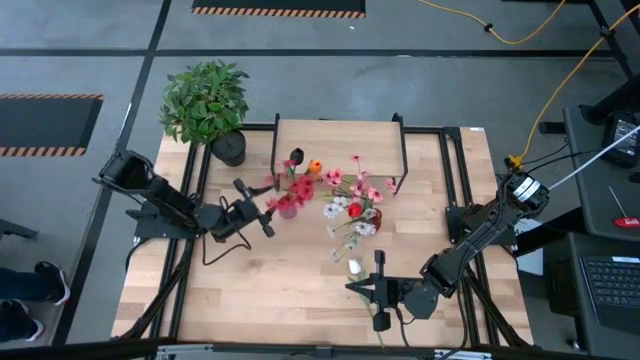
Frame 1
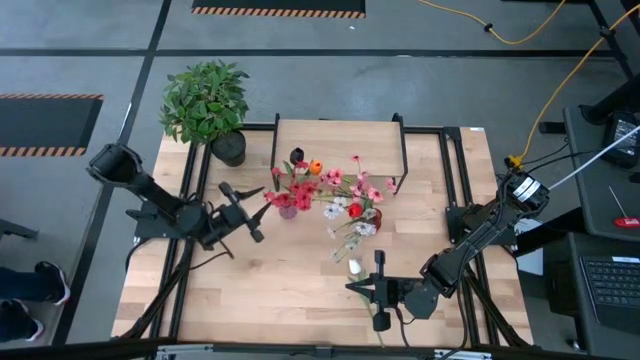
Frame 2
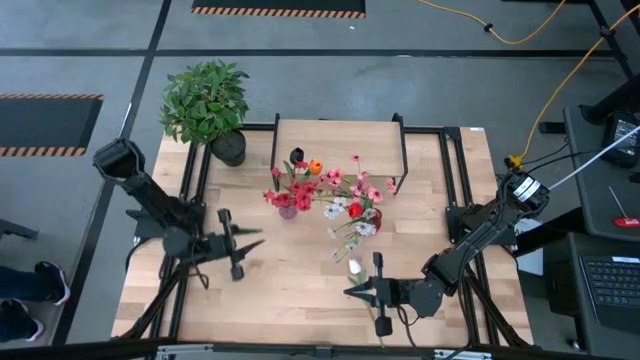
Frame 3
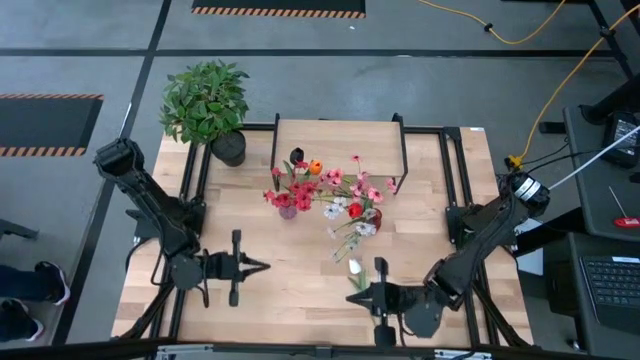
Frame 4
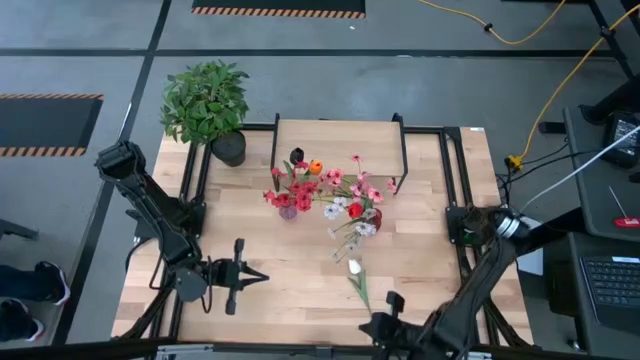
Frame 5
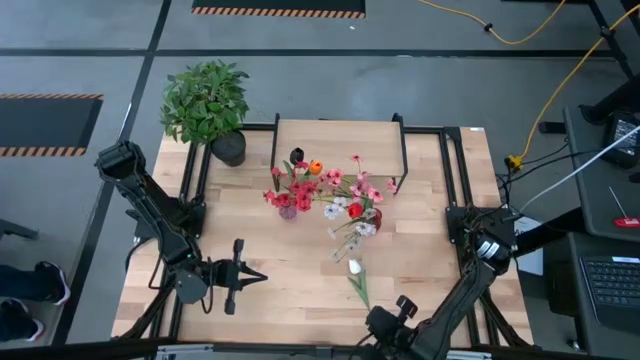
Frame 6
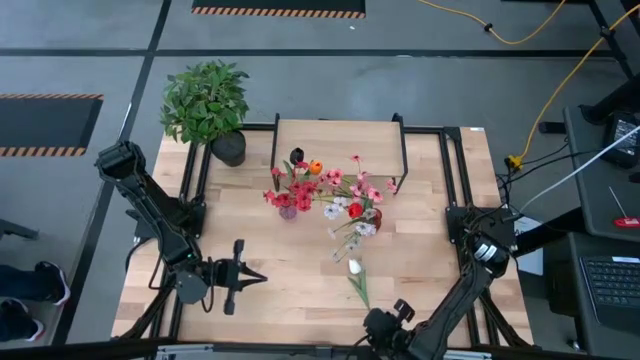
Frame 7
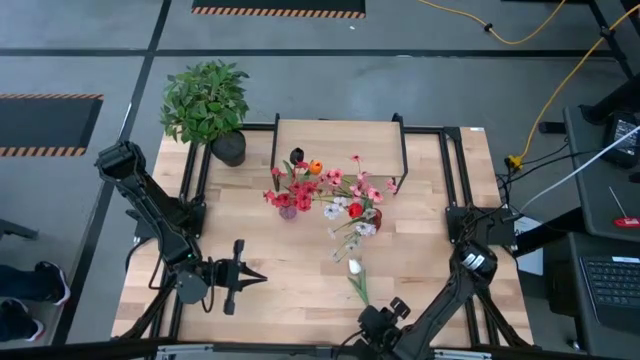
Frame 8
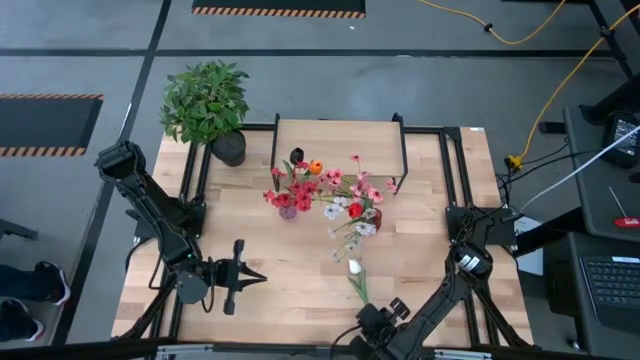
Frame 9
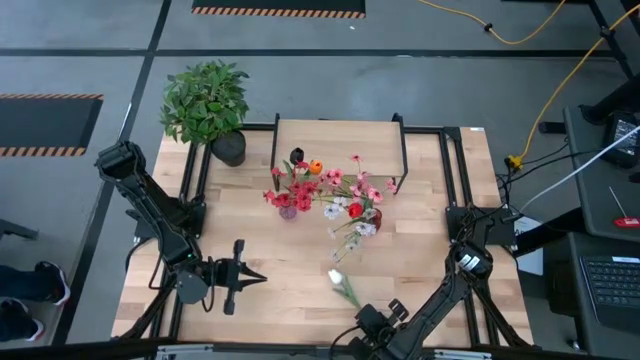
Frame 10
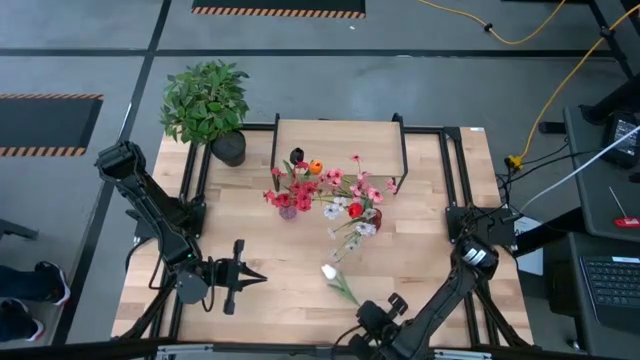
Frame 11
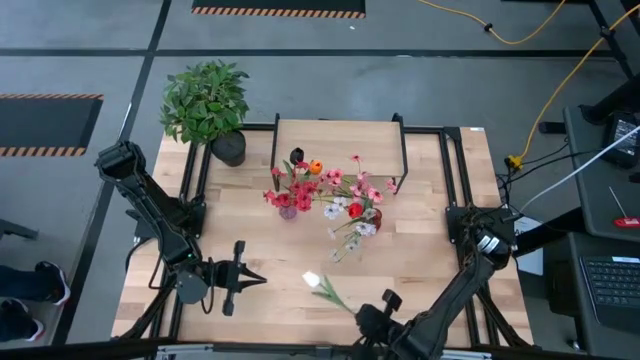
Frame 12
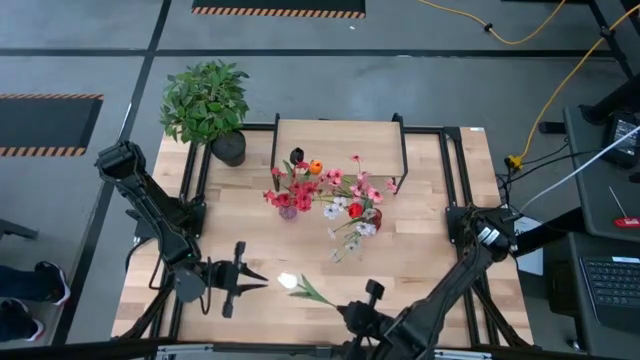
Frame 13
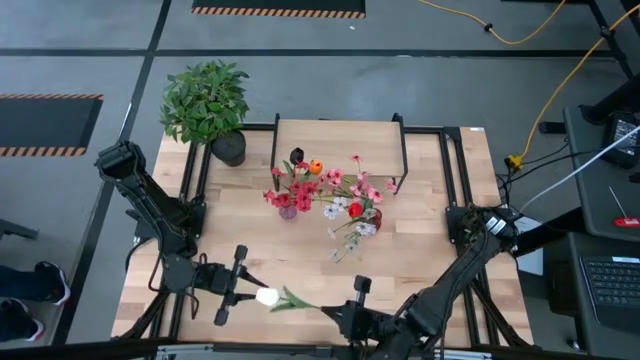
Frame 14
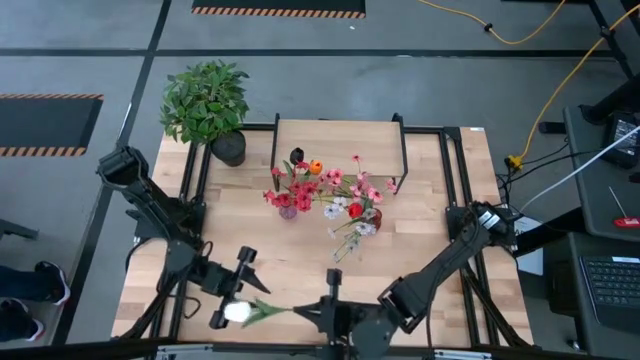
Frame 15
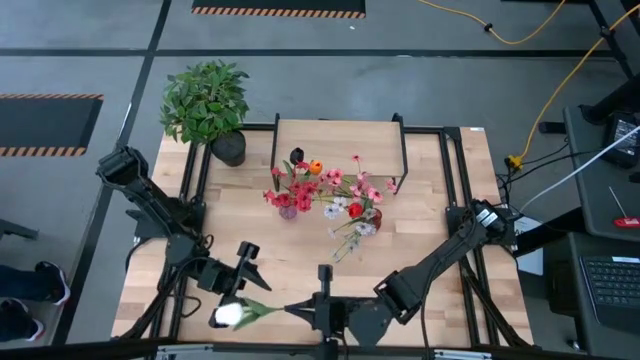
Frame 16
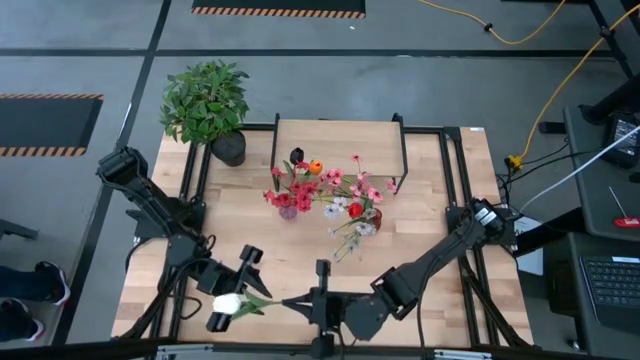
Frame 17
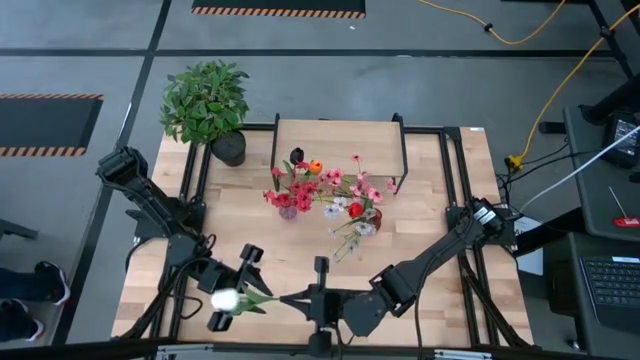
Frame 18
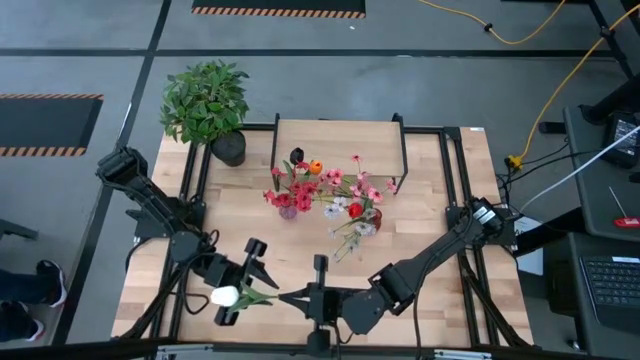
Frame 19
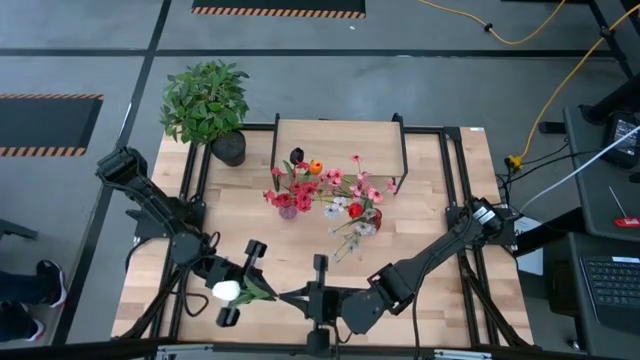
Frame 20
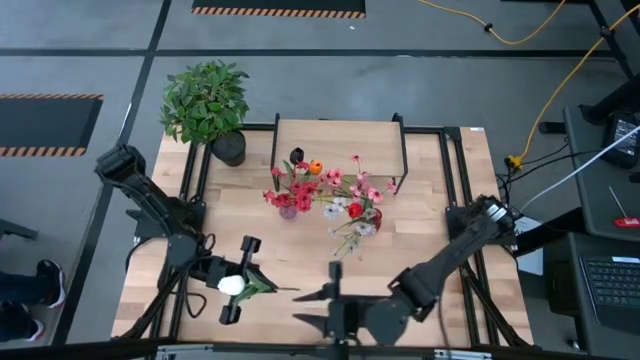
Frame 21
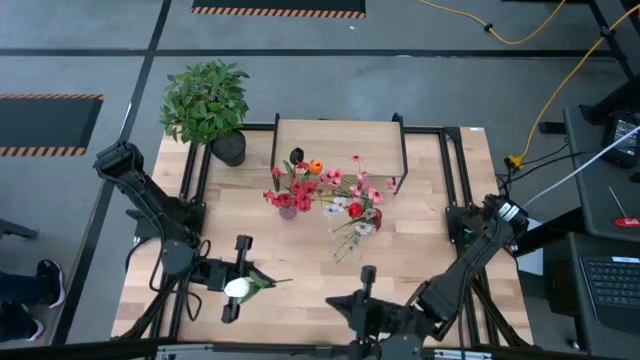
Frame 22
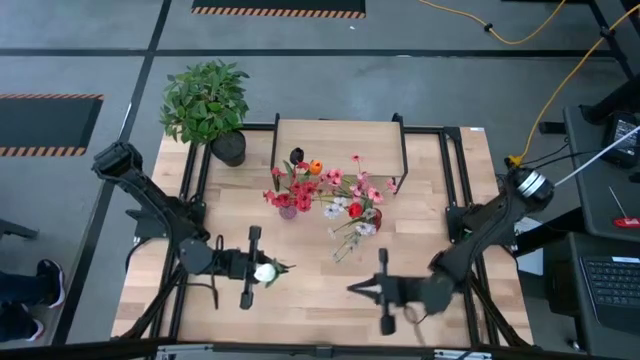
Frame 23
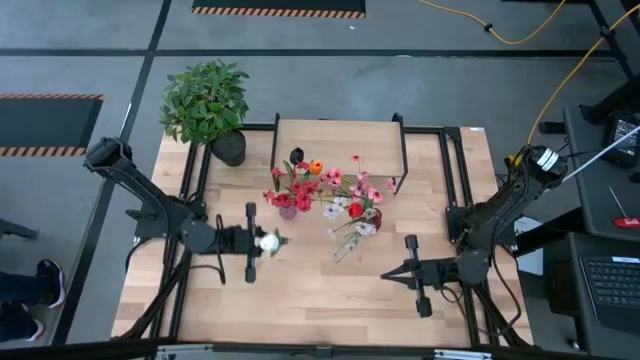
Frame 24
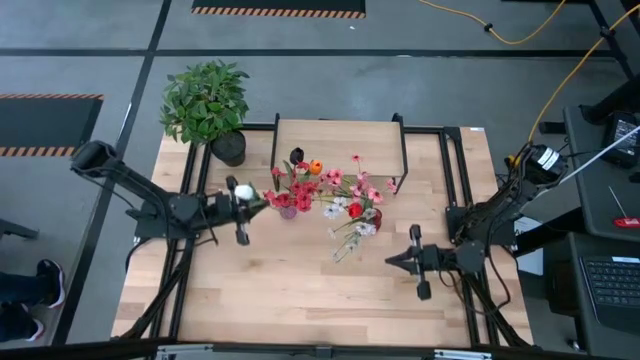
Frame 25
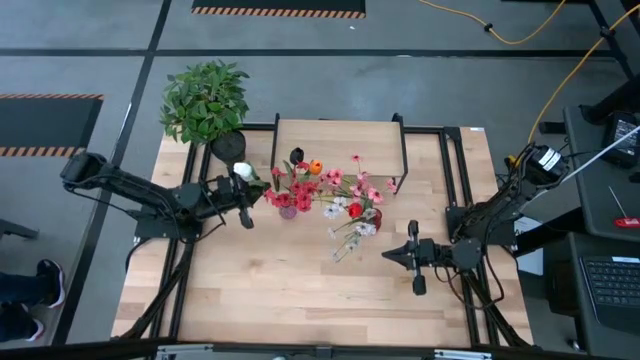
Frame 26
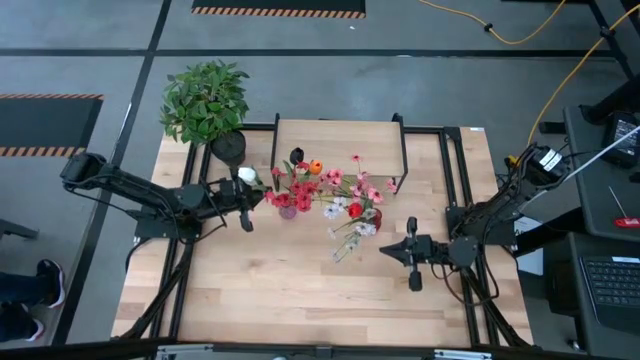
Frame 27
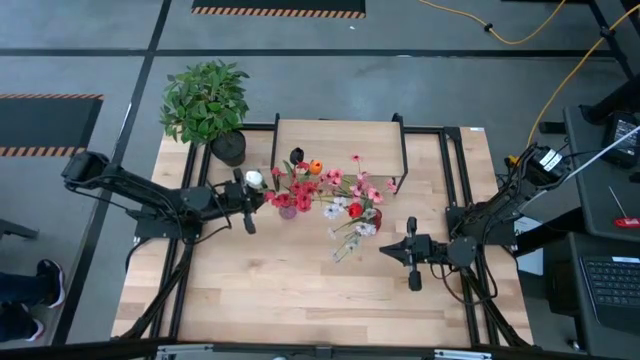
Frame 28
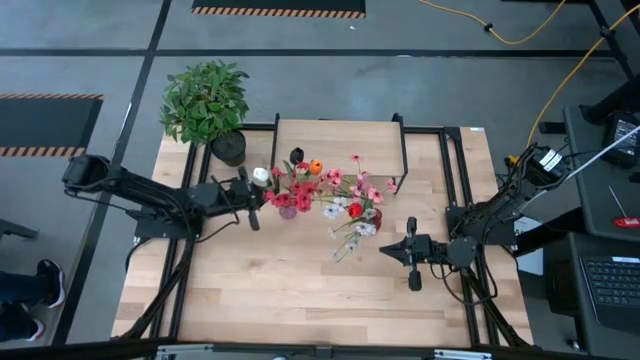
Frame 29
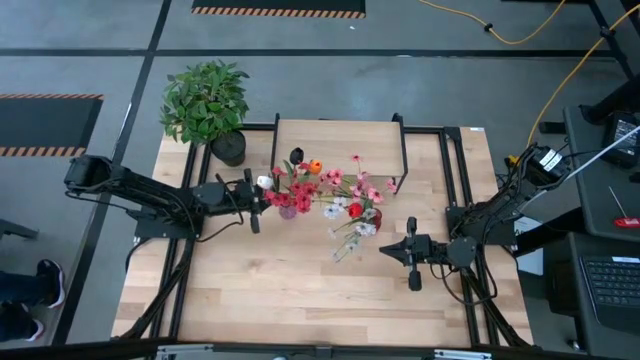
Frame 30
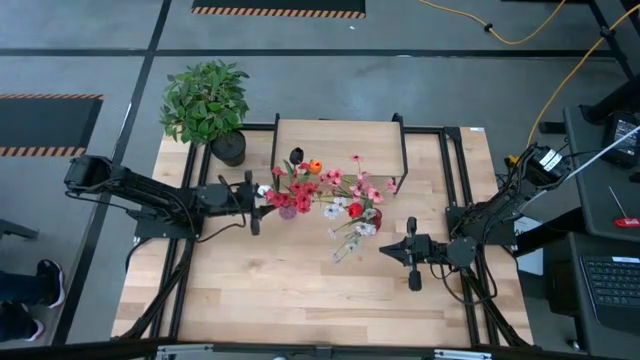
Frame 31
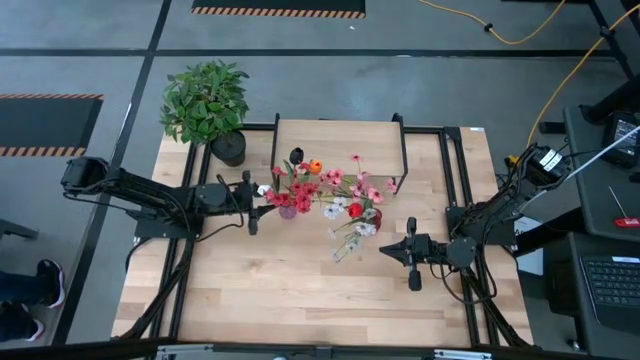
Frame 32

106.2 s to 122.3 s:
Task: Pick and place flowers into a vace then onto a shelf
Put the white tulip into the purple vase

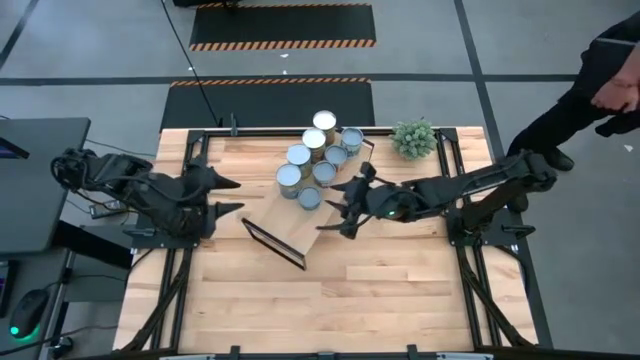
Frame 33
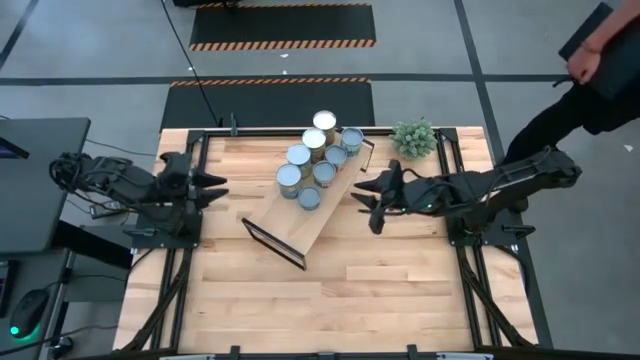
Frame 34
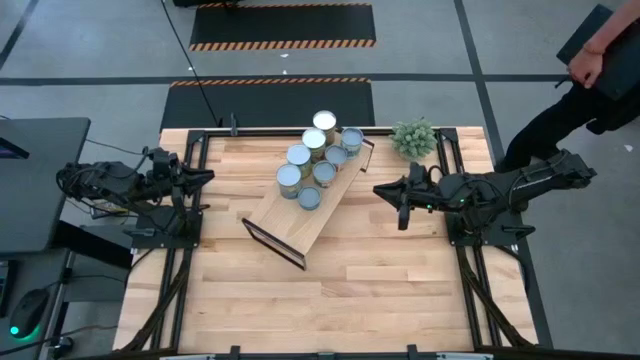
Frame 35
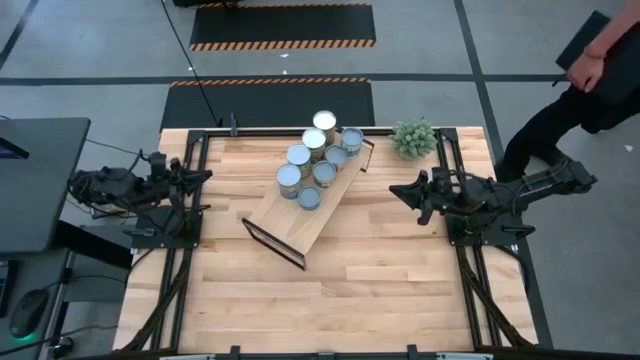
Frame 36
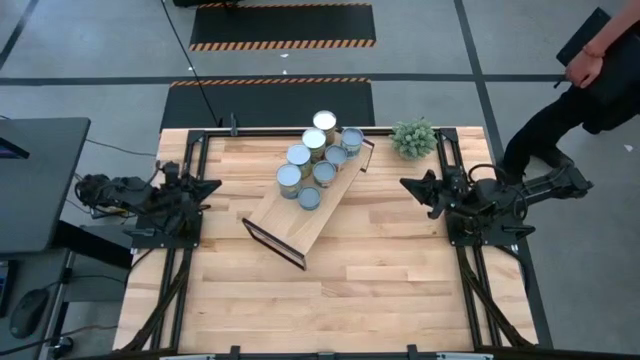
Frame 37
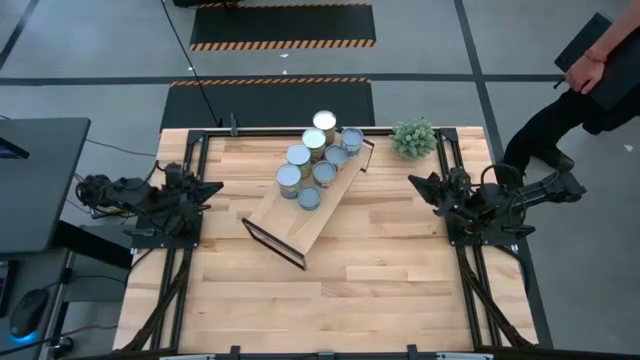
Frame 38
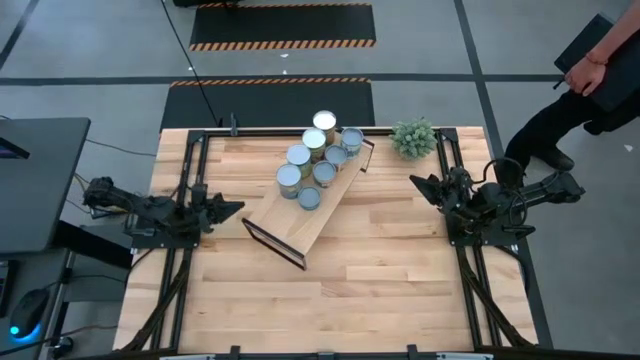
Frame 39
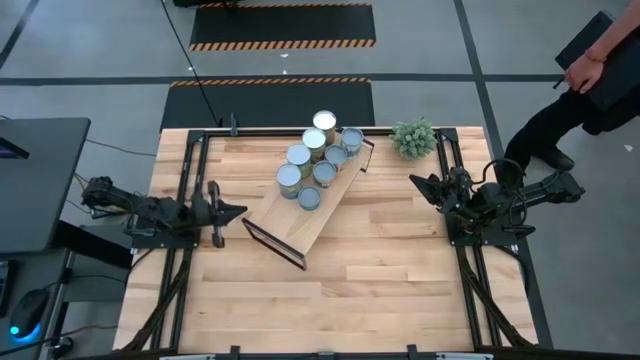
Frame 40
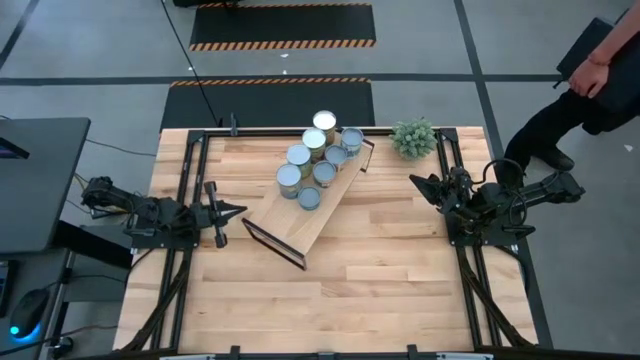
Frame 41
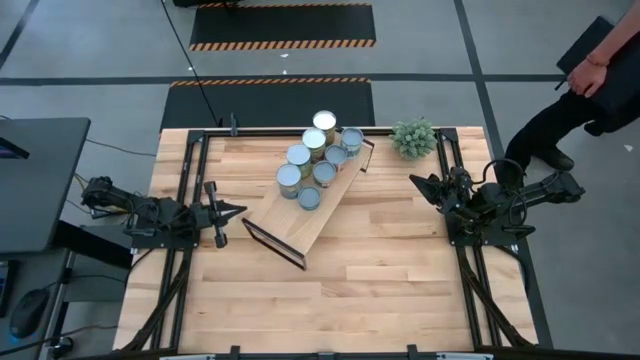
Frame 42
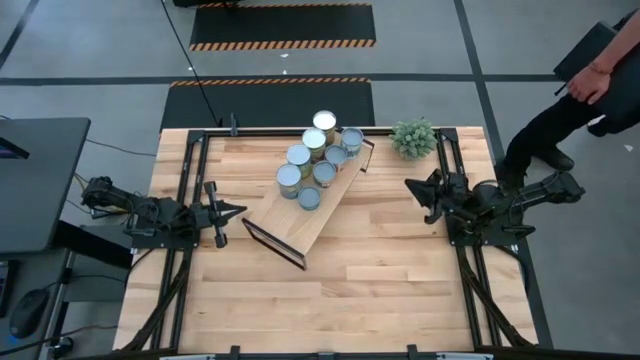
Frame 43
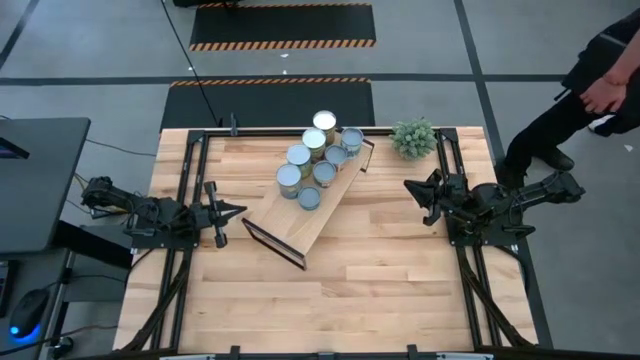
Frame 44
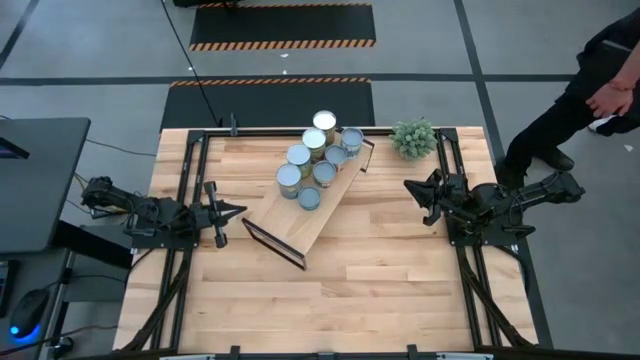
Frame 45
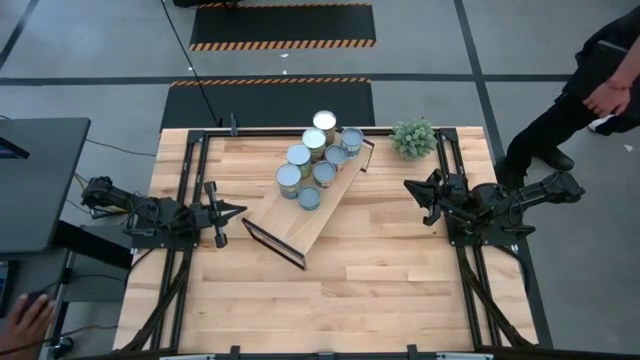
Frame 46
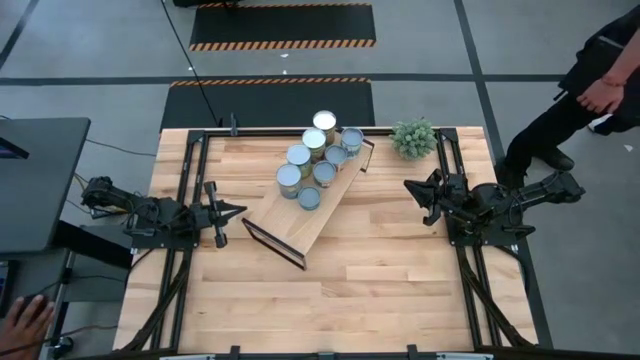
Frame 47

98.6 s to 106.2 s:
Task: Pick and place cans onto a shelf
Return to Home Position
